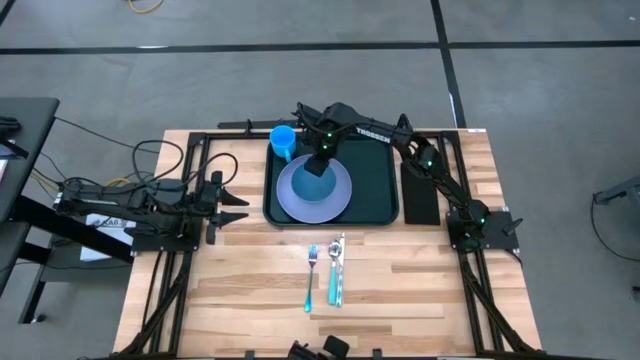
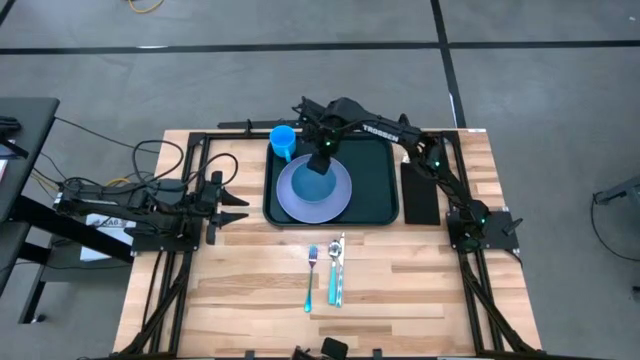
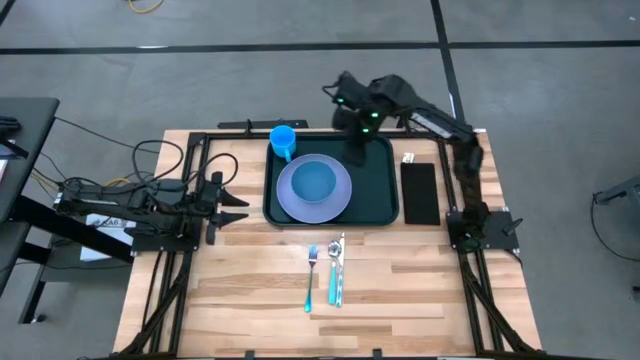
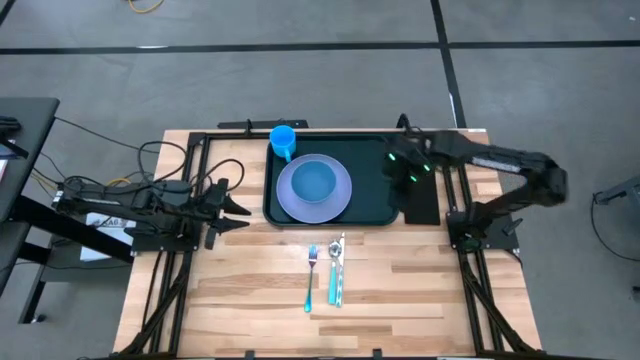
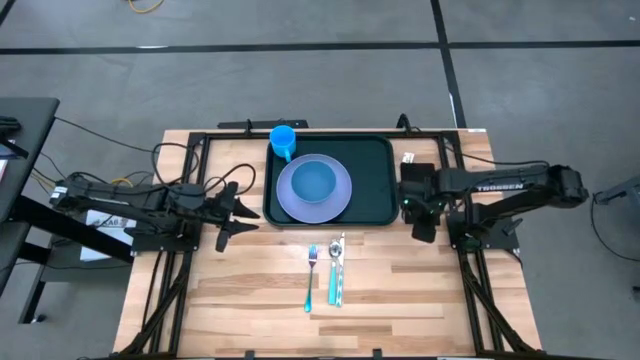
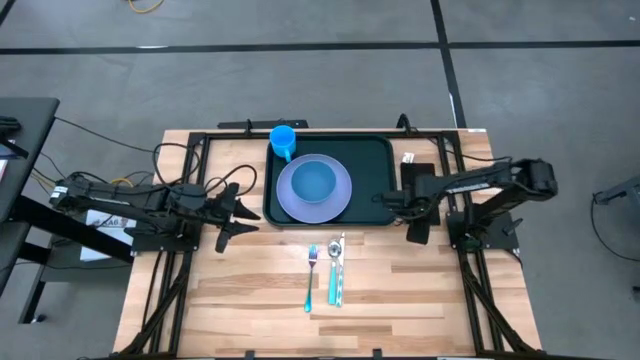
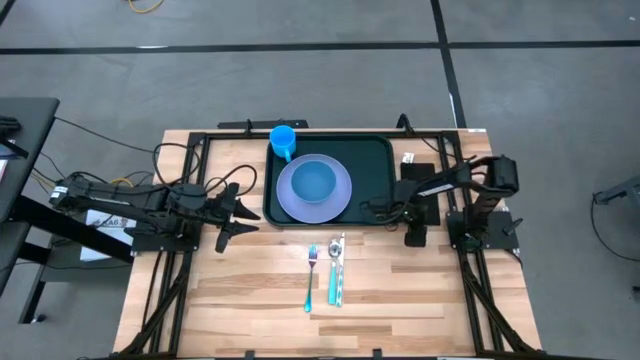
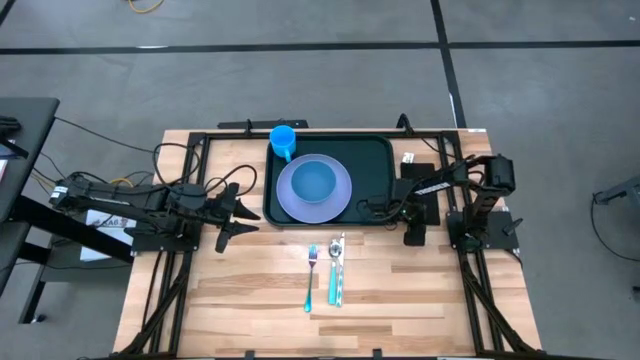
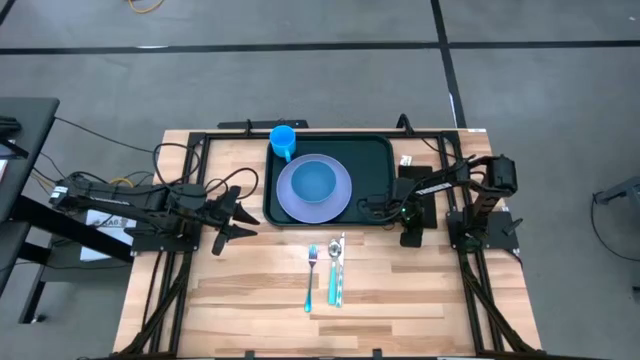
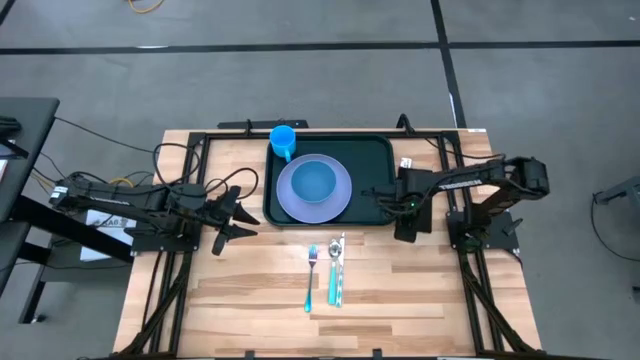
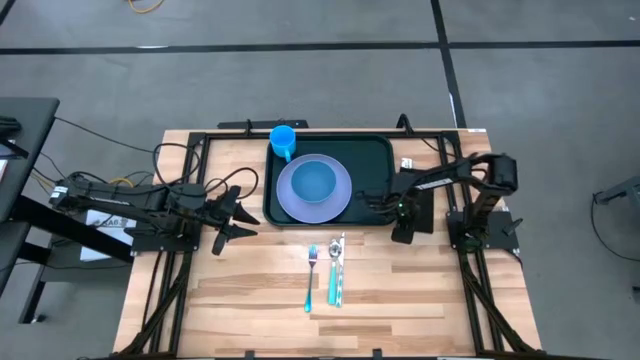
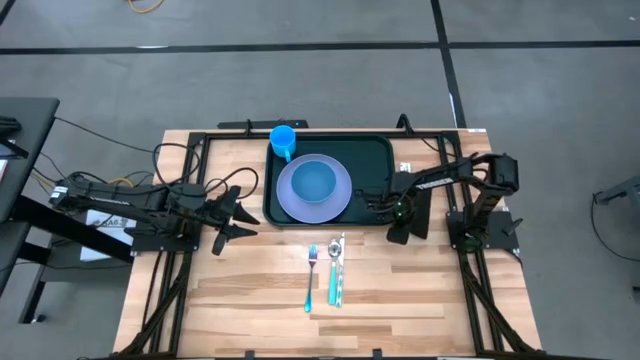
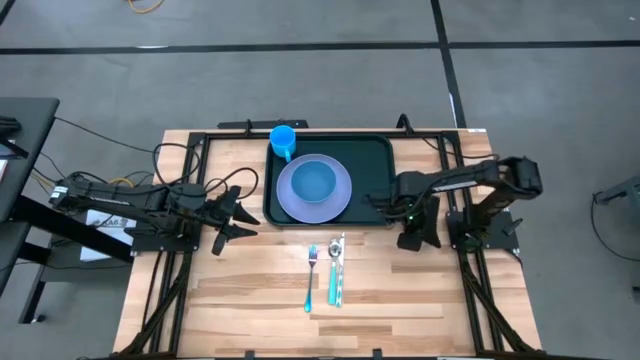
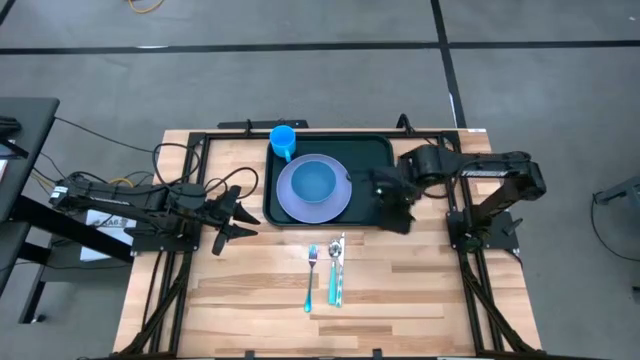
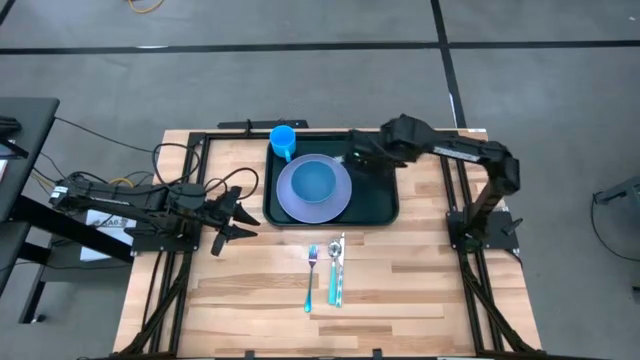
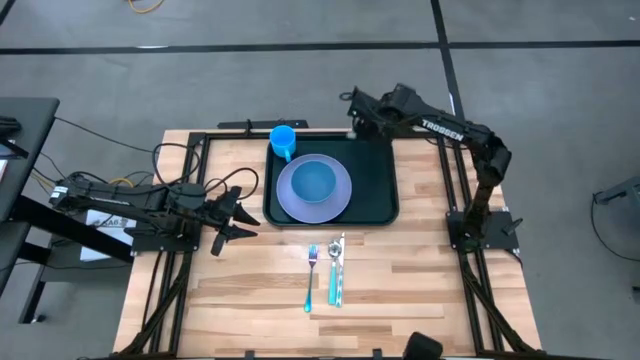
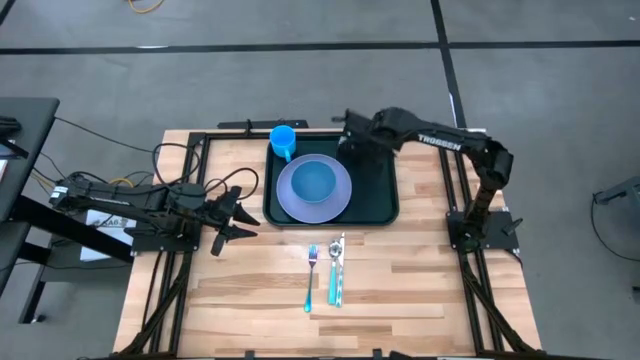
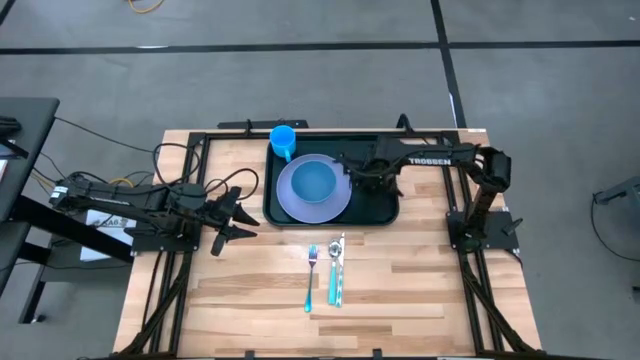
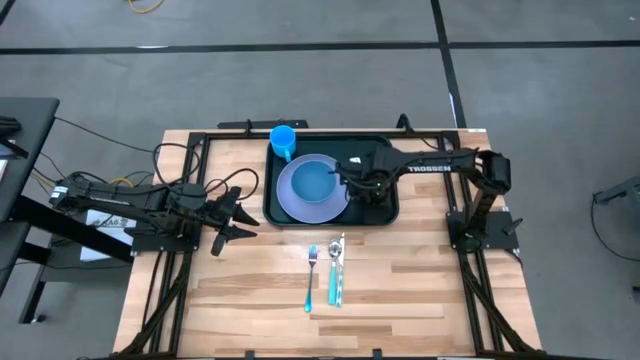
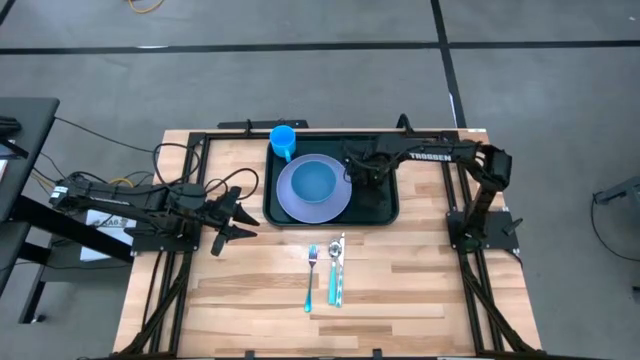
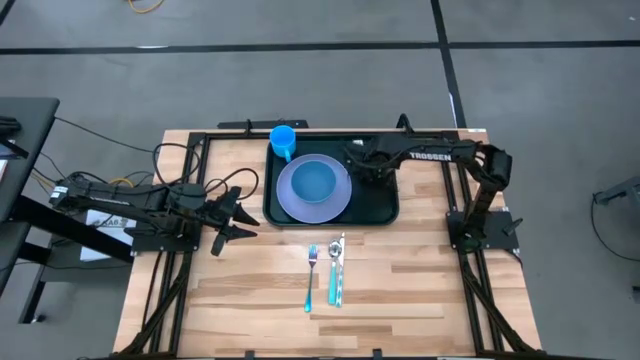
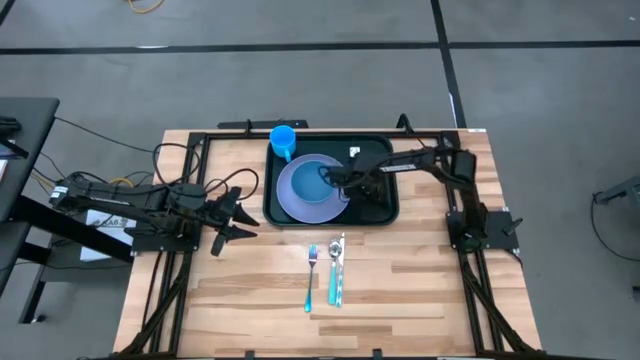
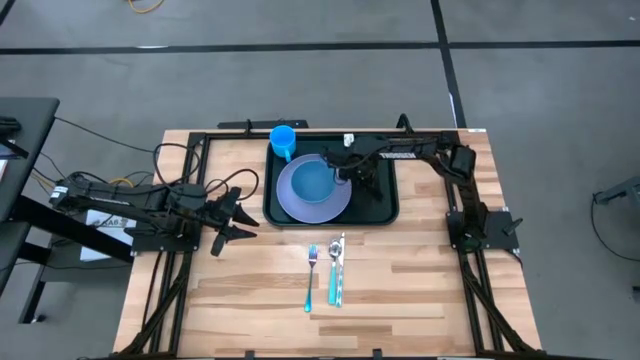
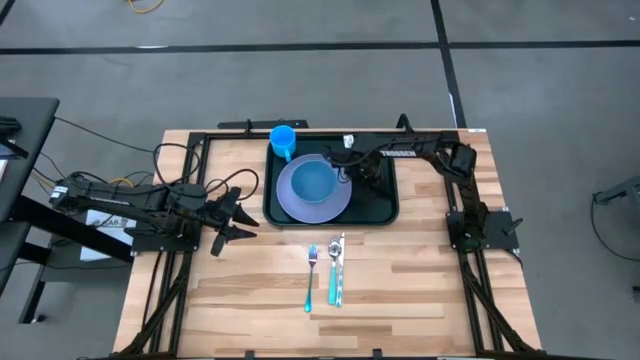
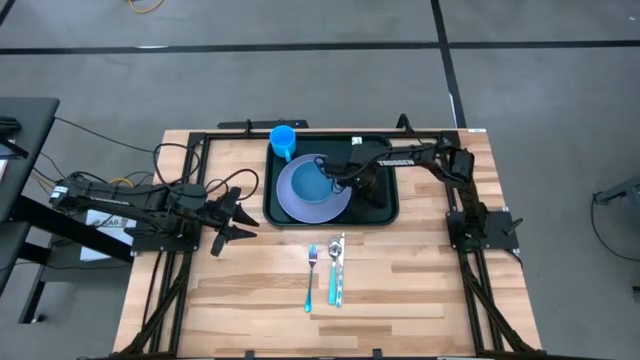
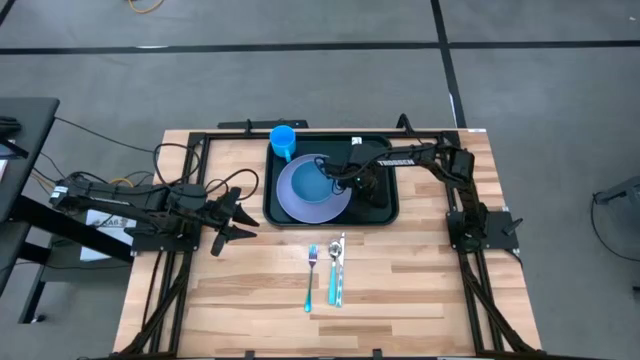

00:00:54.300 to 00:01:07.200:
Task: Set up tray
Put the black napkin on the black serving tray to the right of the violet plate

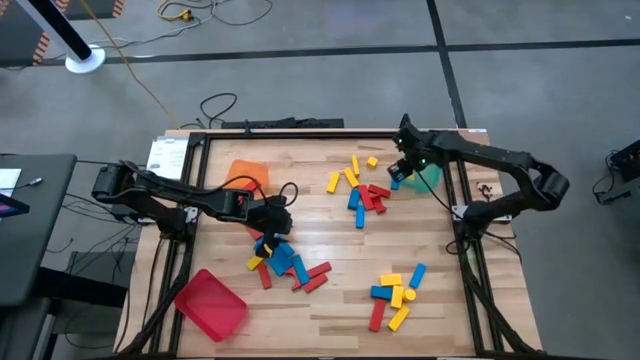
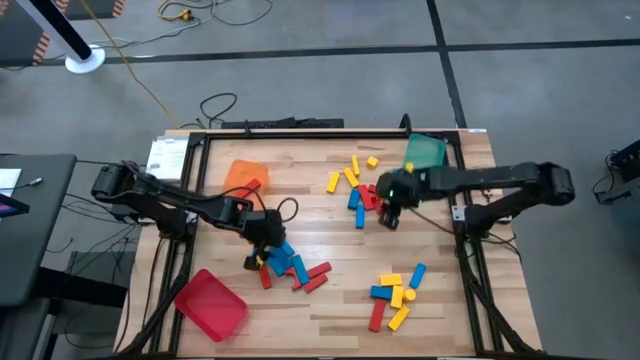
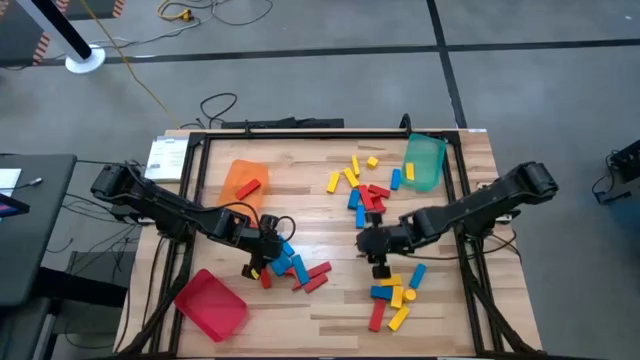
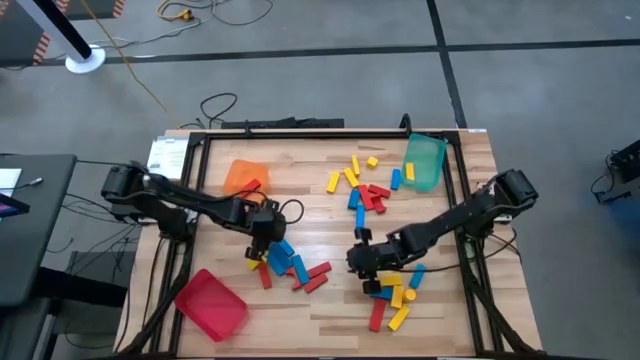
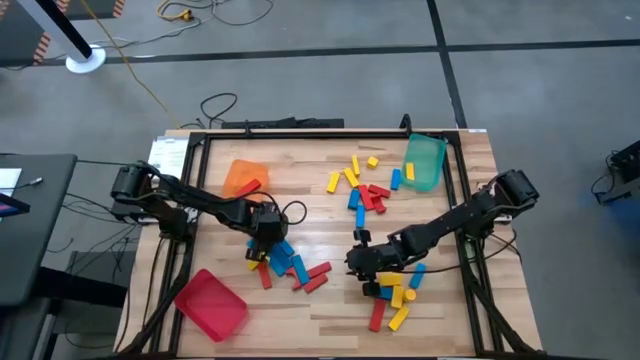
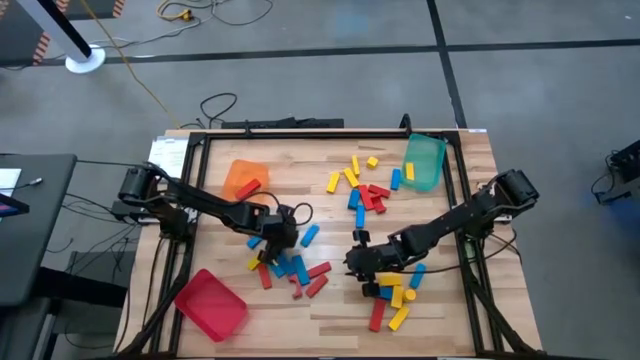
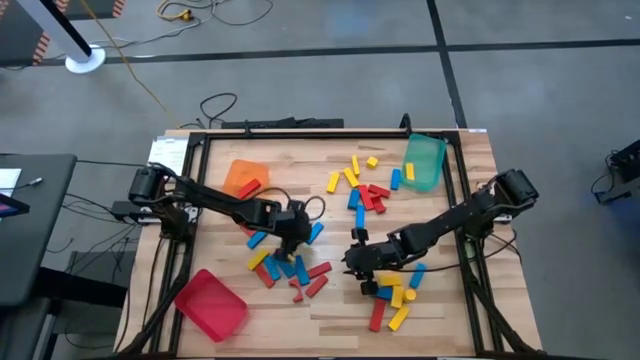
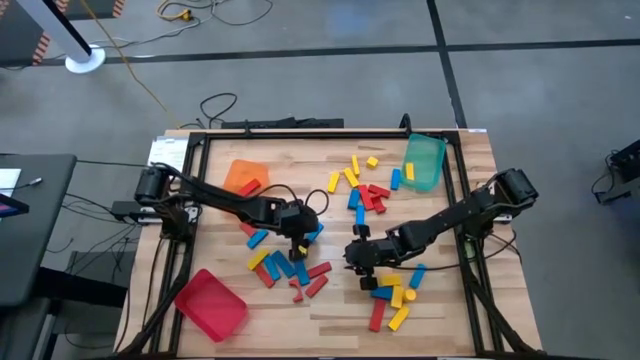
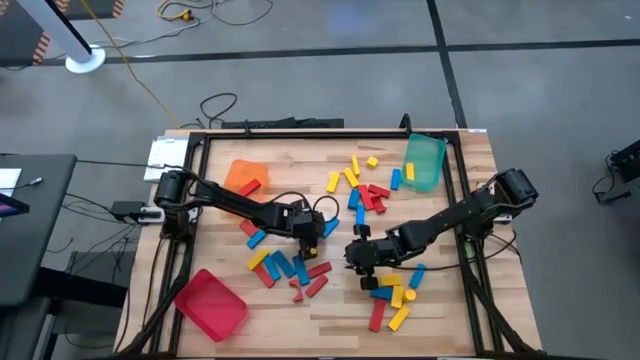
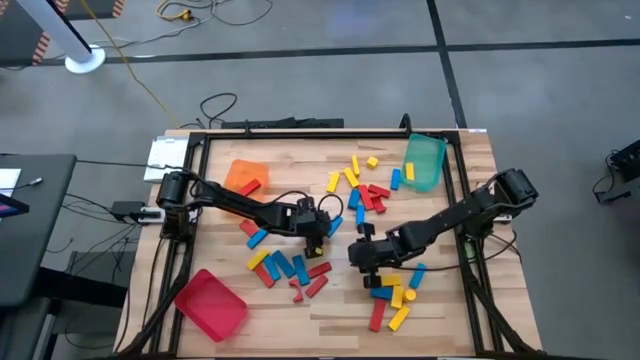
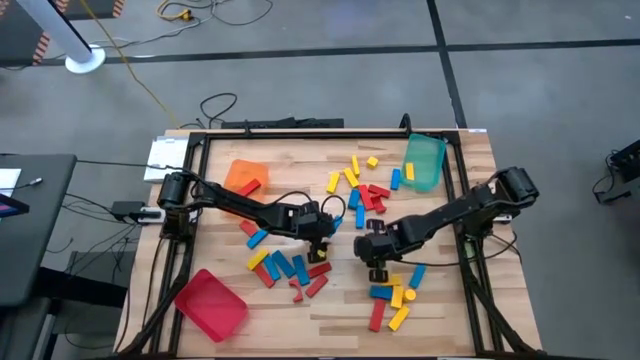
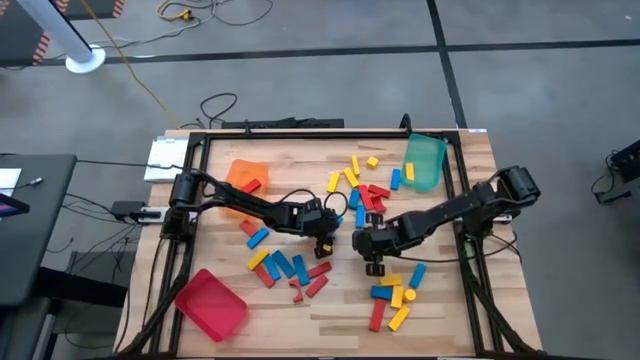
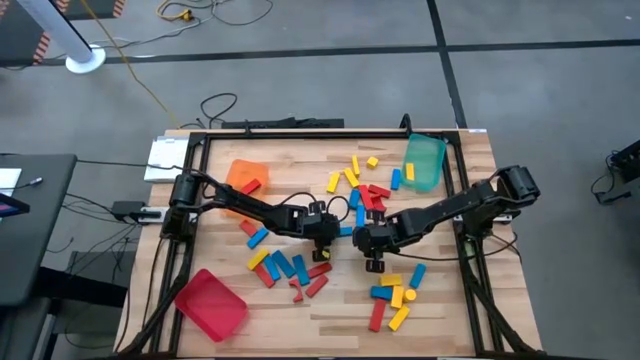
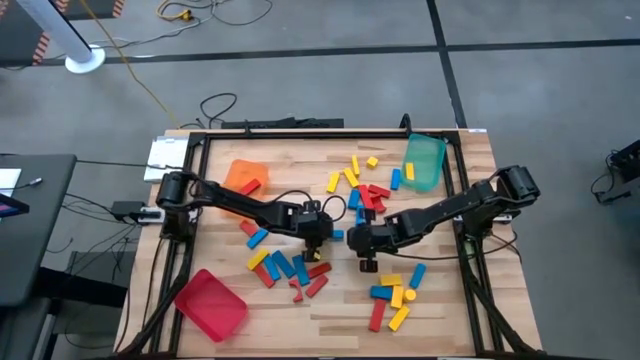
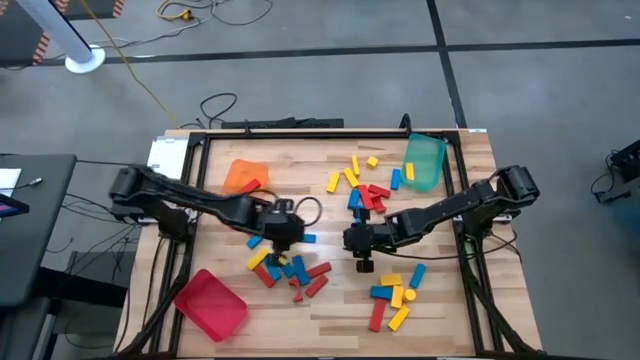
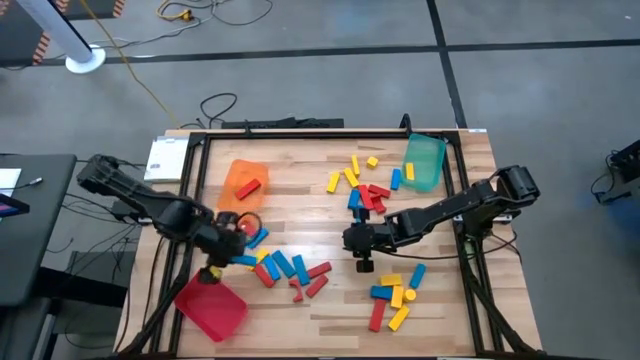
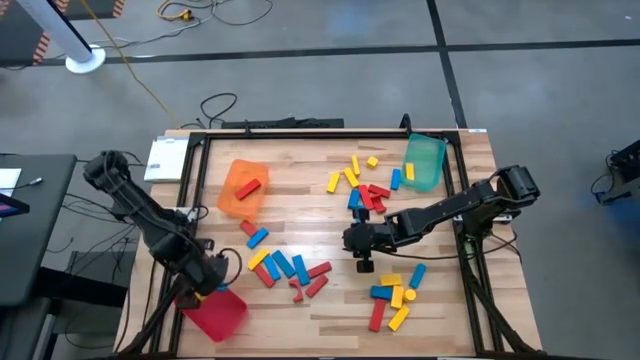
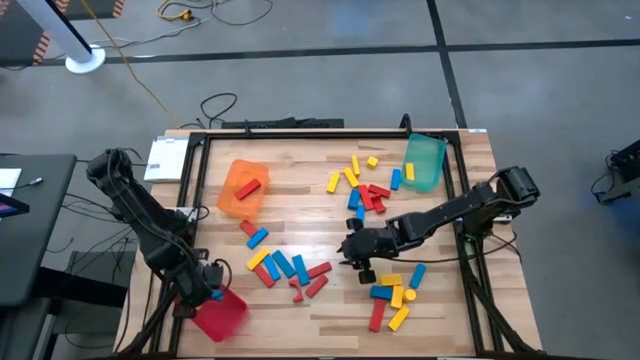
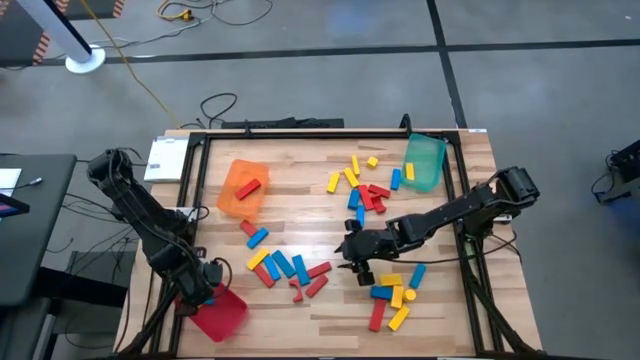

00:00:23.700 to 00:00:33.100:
Task: Sort blocks
Put the blue wooden block into the red bin
